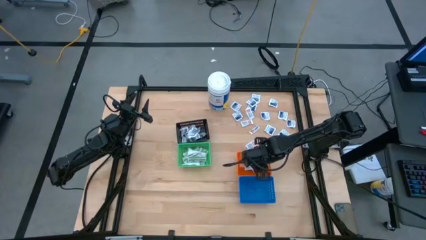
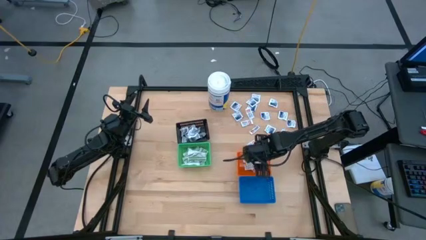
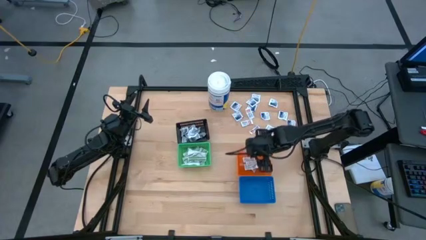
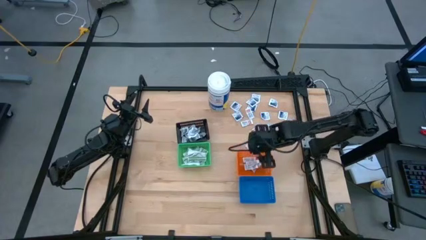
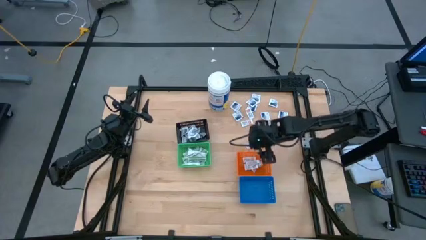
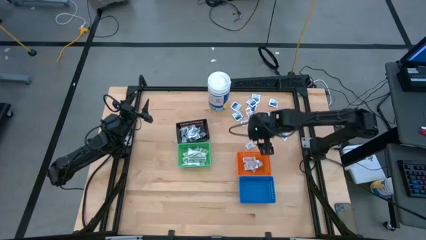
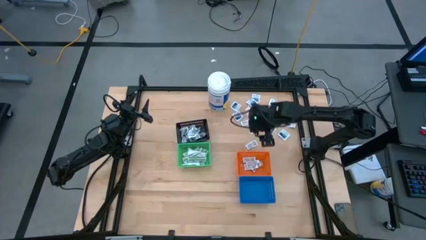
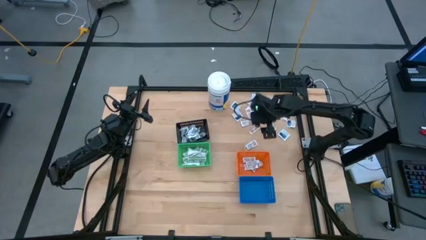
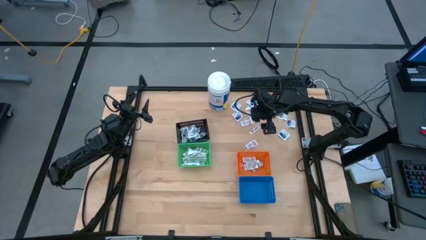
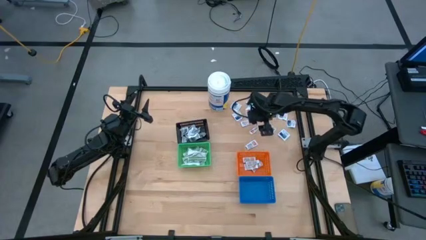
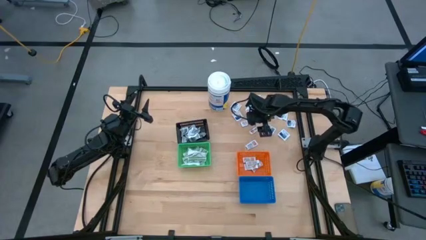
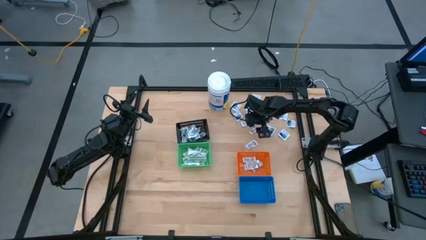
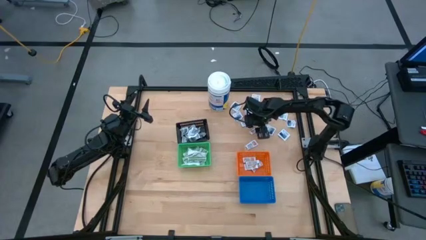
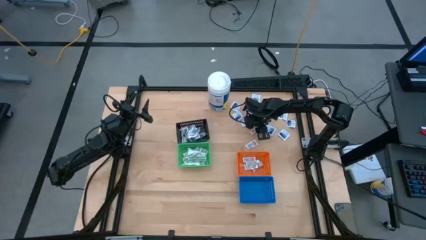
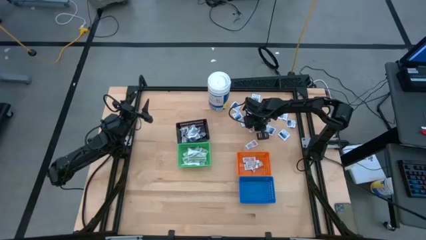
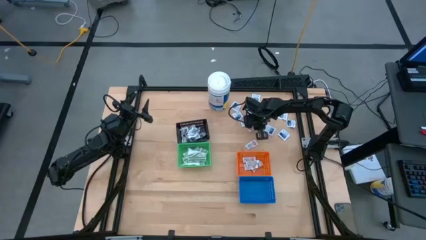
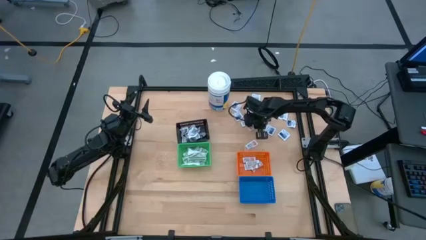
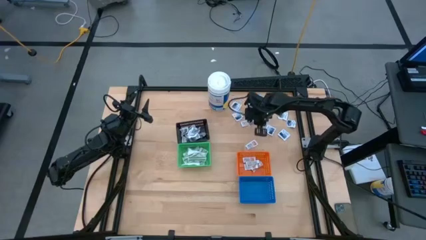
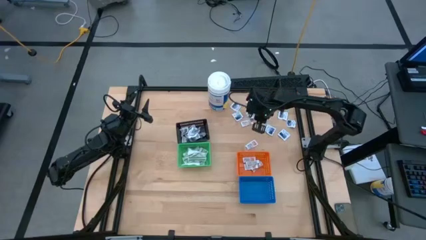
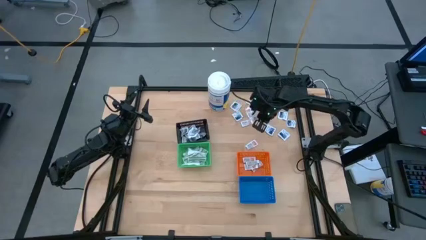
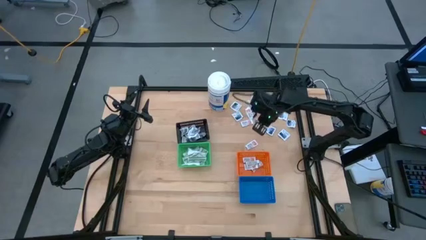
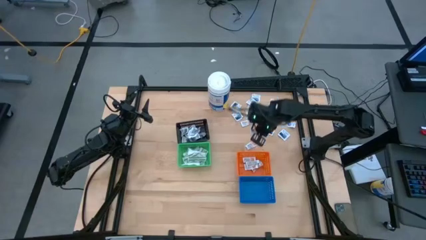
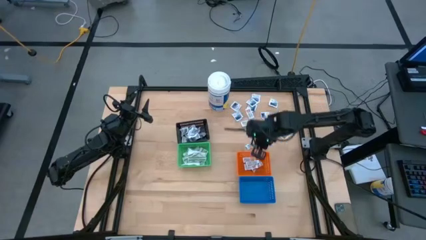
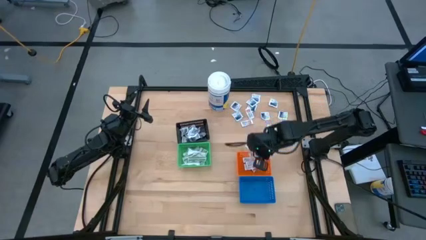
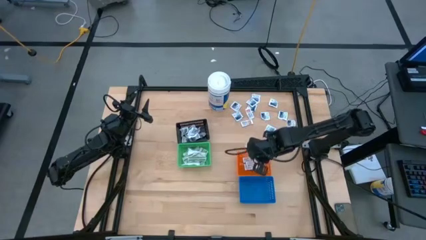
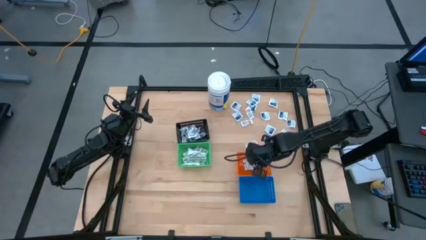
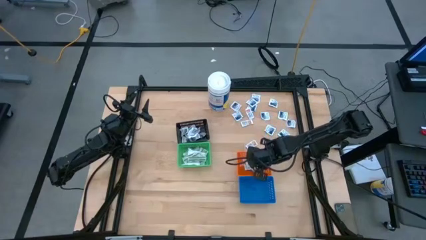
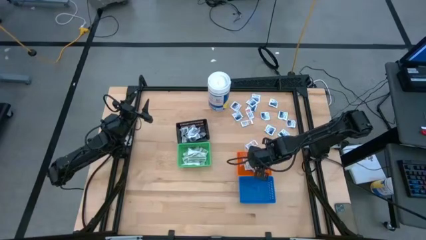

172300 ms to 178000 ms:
Task: Pick & Place First Aid Supplies
Put the orange pad into the orange bin

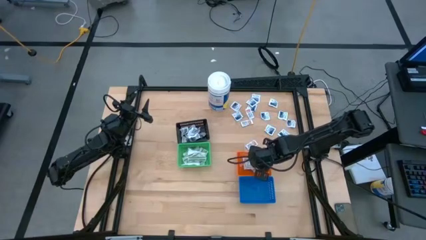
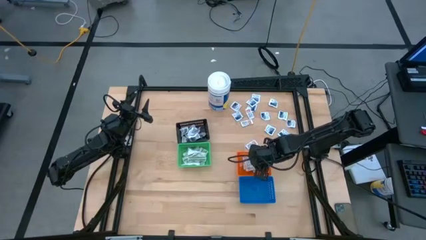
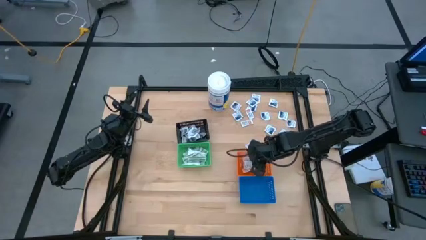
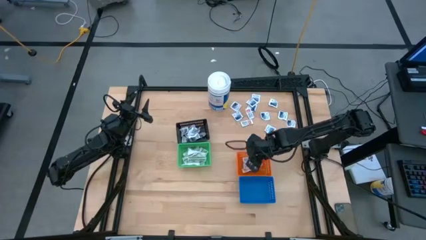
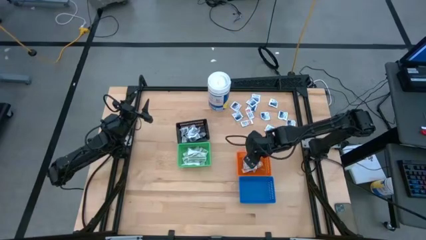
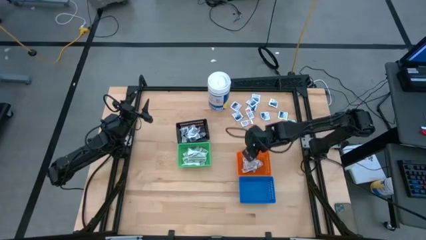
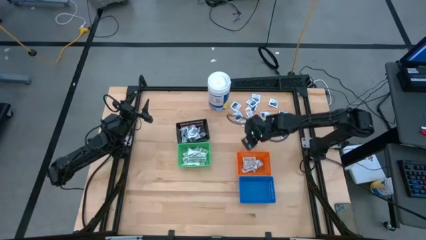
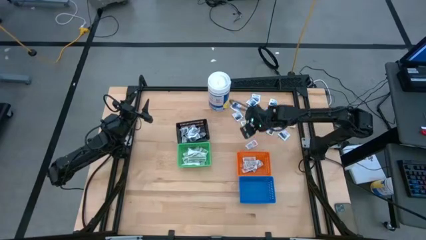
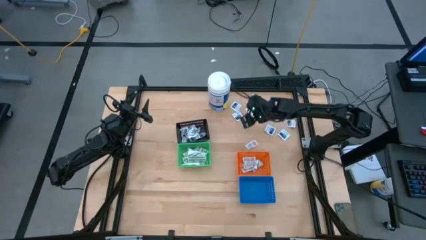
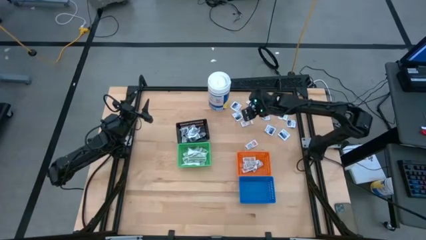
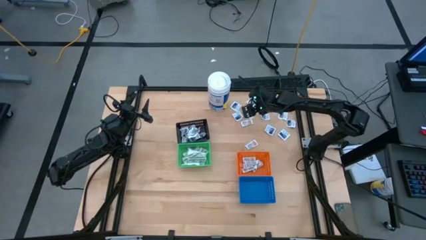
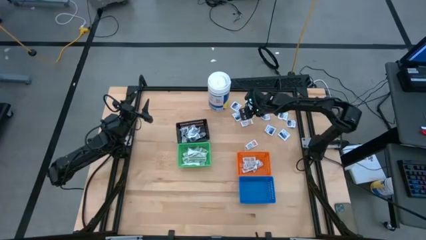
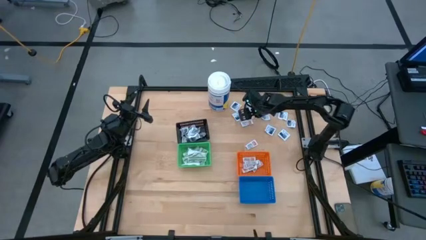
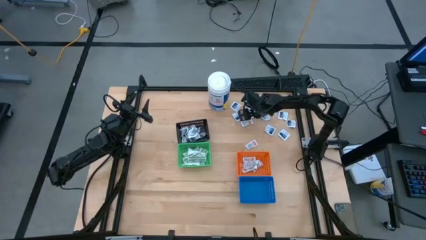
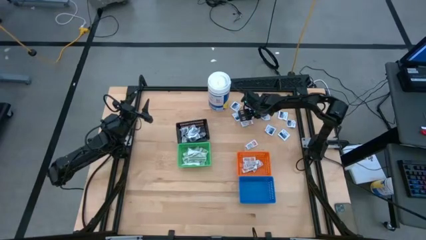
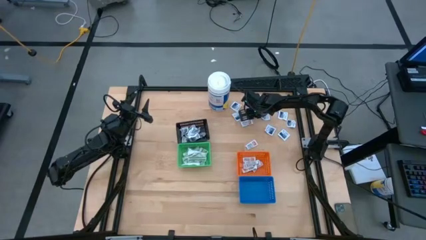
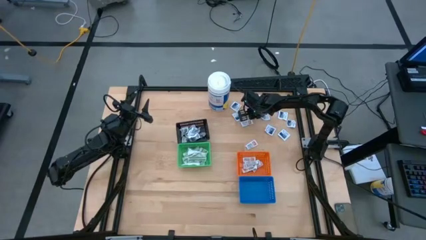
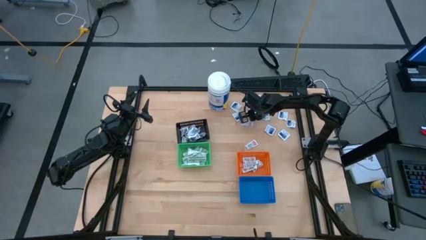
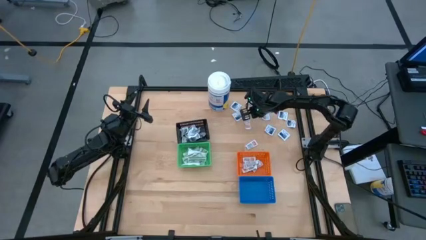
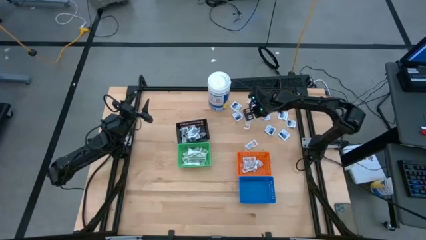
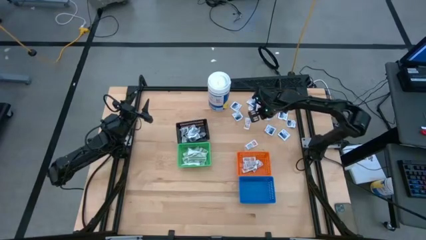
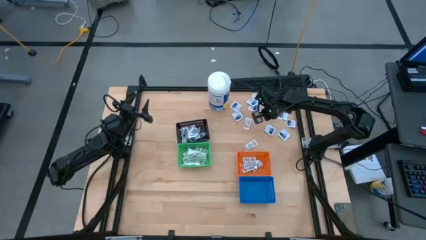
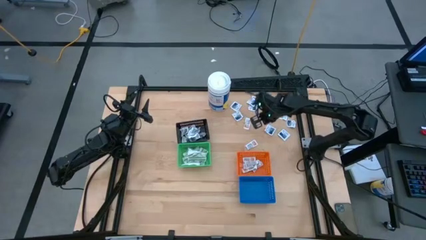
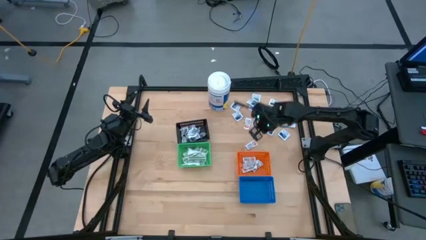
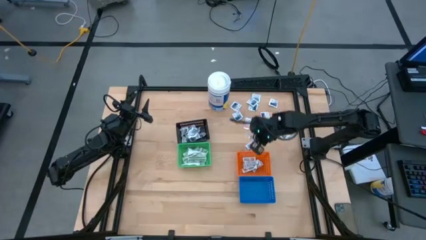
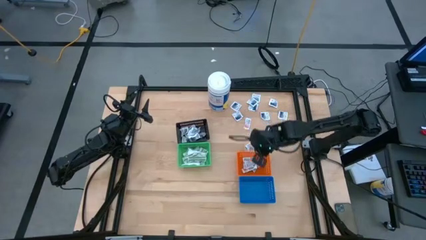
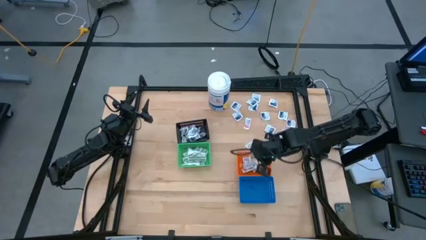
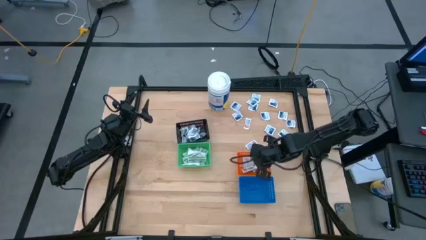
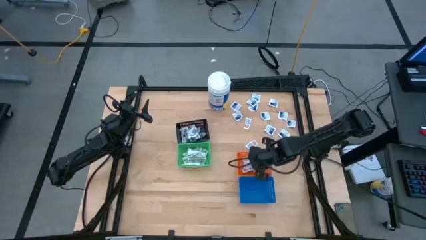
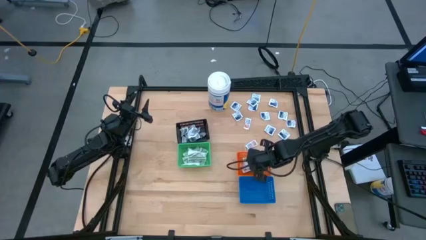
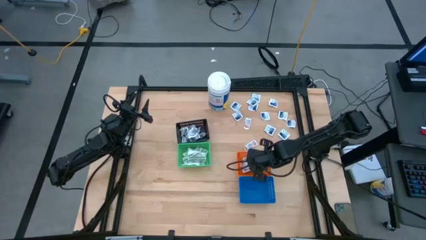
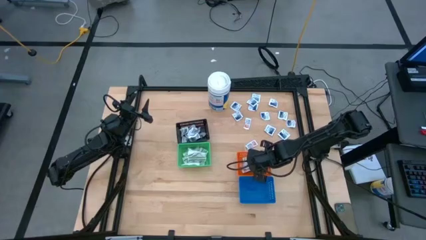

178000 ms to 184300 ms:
Put the orange pad into the orange bin

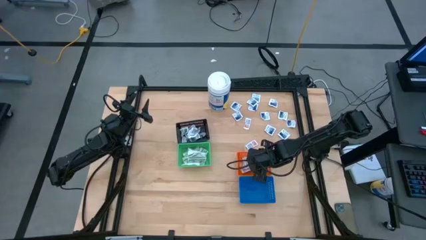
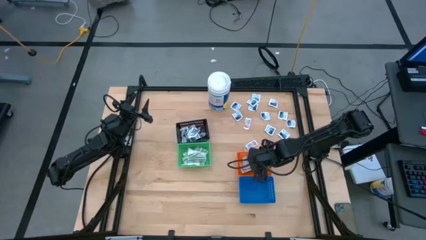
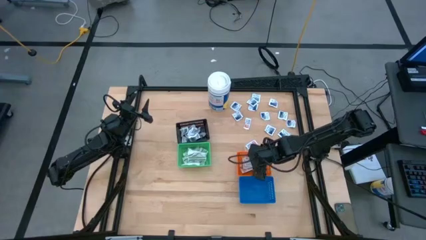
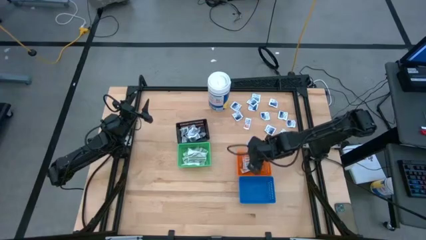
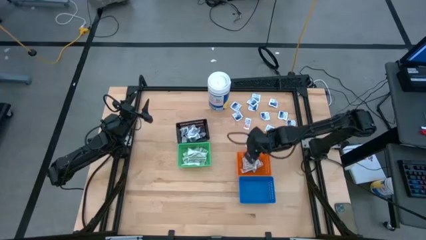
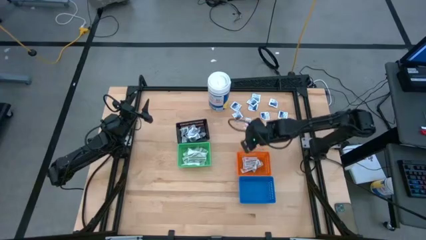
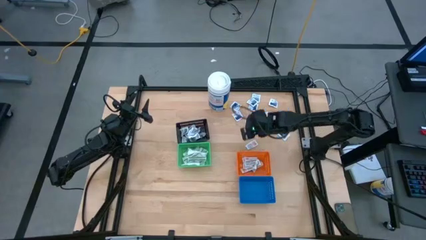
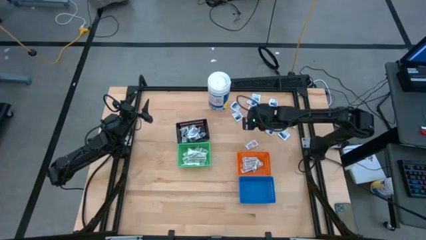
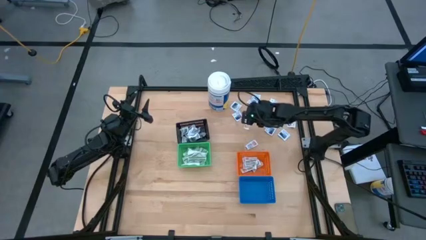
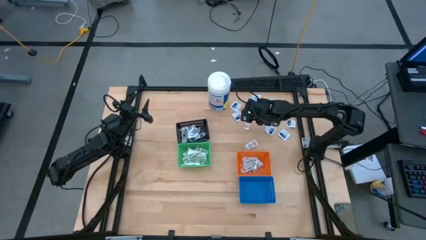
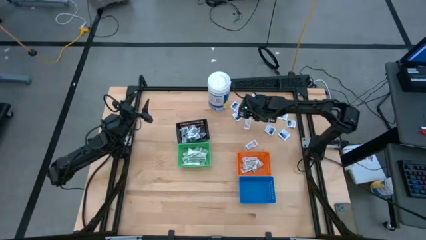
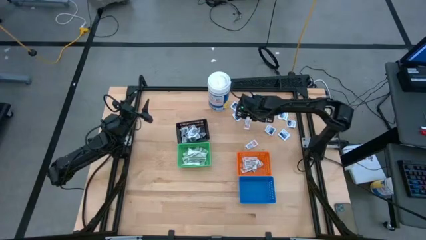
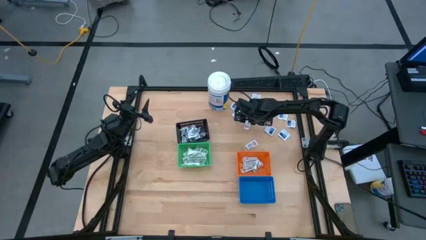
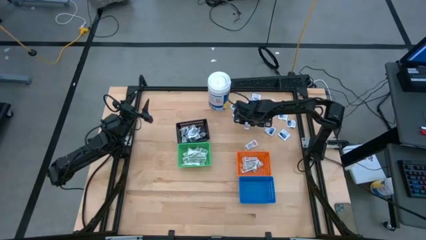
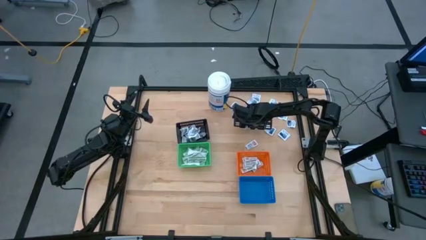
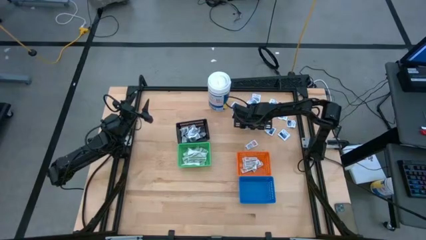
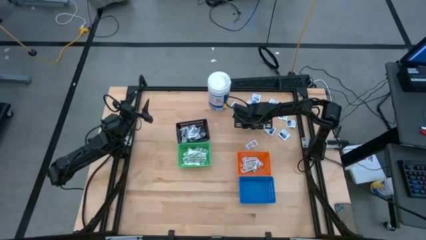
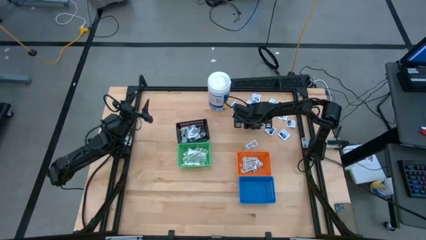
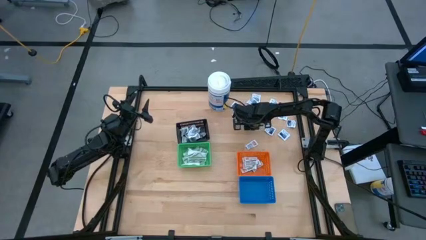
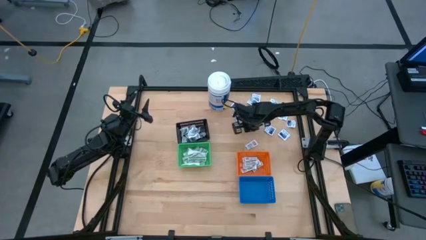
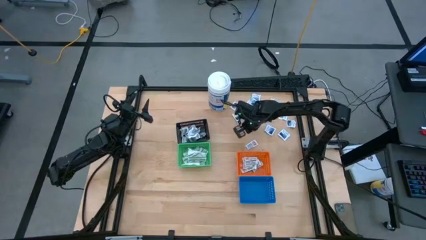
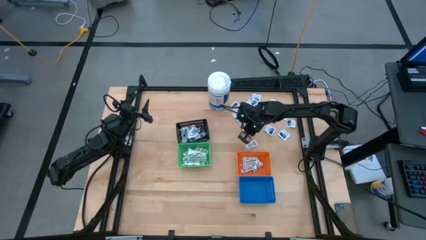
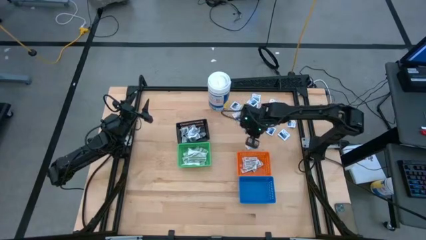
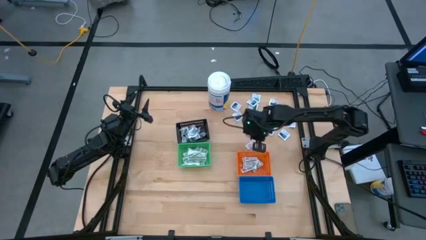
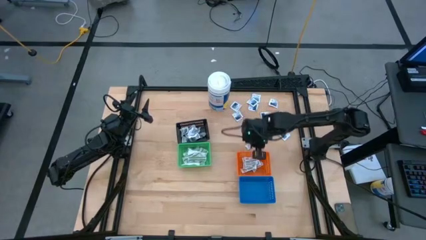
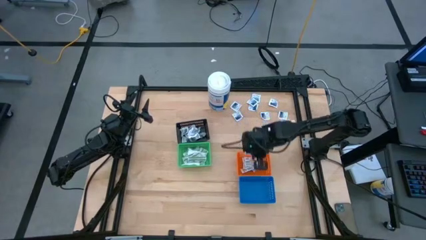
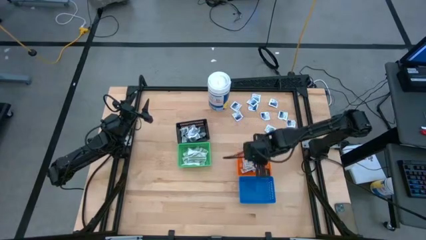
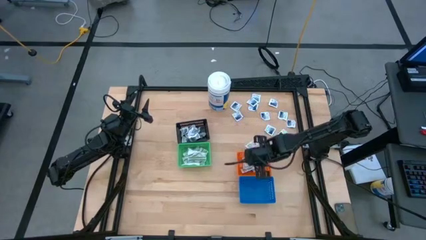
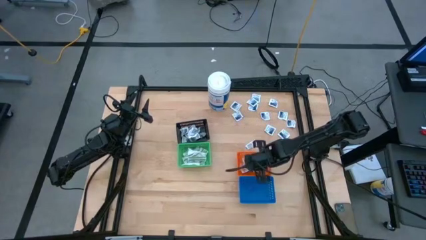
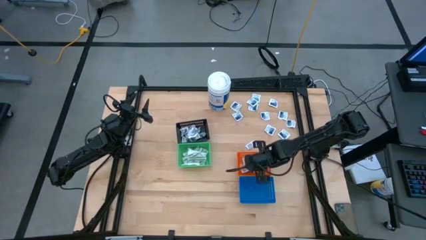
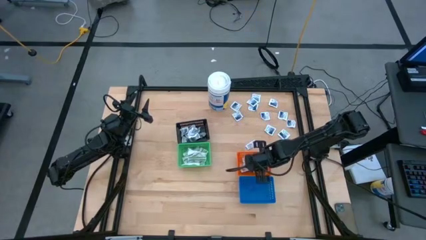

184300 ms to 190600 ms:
Put the orange pad into the orange bin
